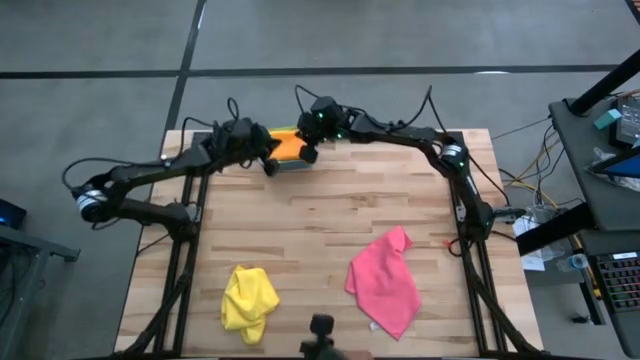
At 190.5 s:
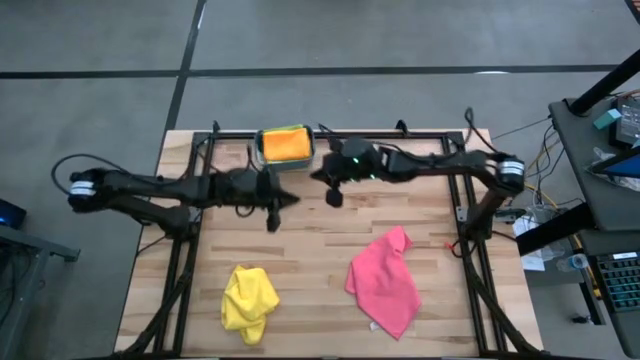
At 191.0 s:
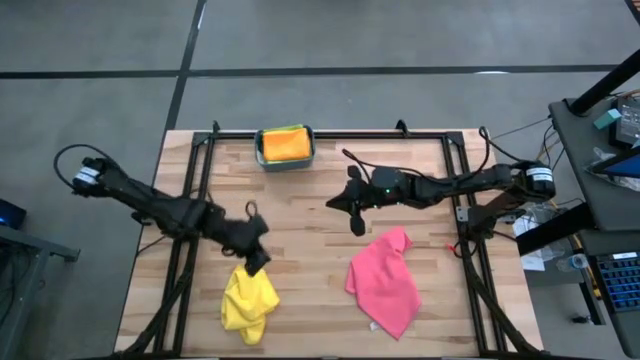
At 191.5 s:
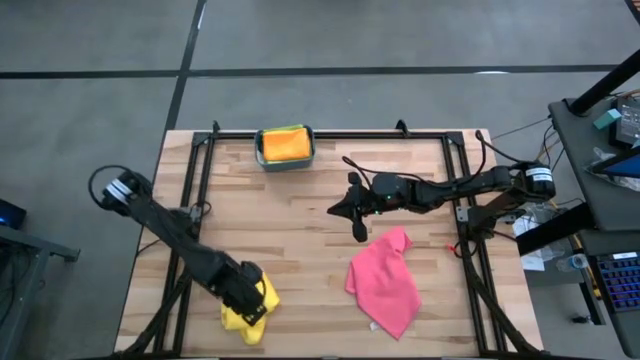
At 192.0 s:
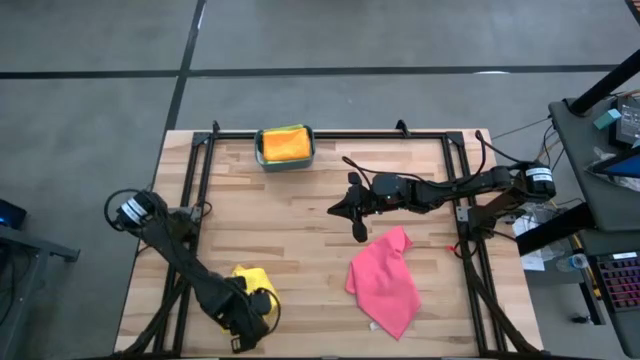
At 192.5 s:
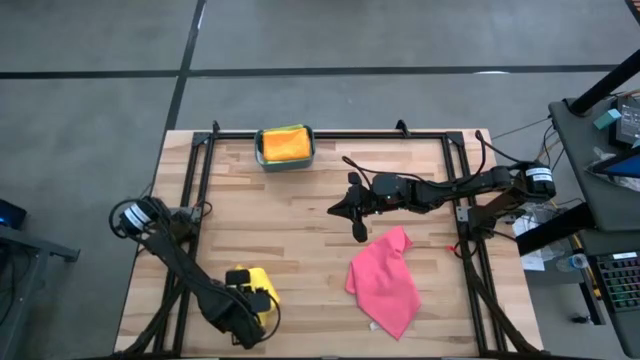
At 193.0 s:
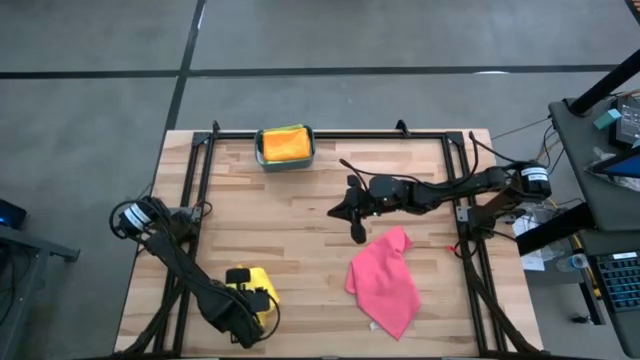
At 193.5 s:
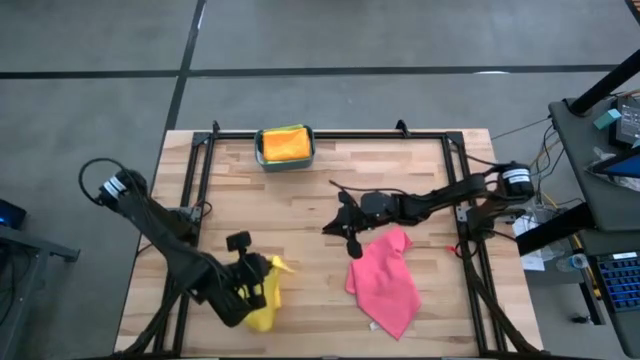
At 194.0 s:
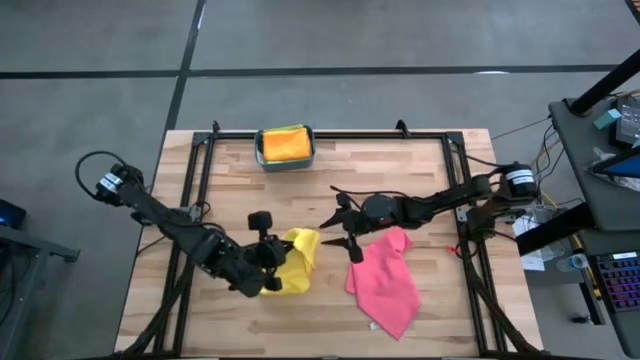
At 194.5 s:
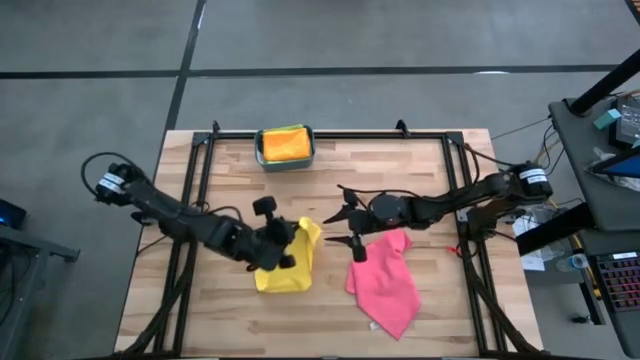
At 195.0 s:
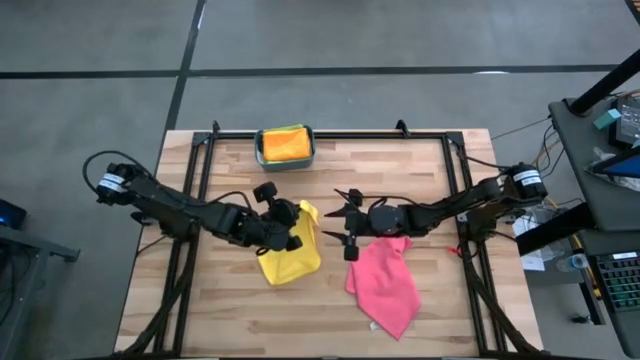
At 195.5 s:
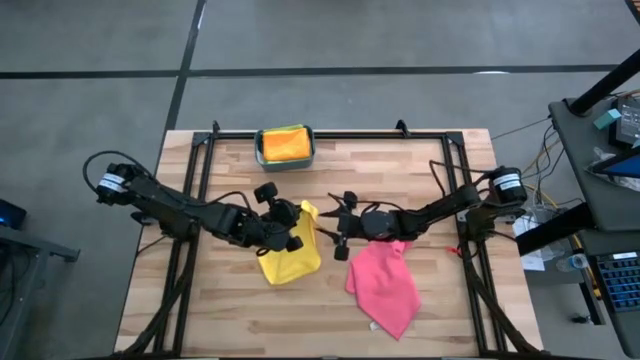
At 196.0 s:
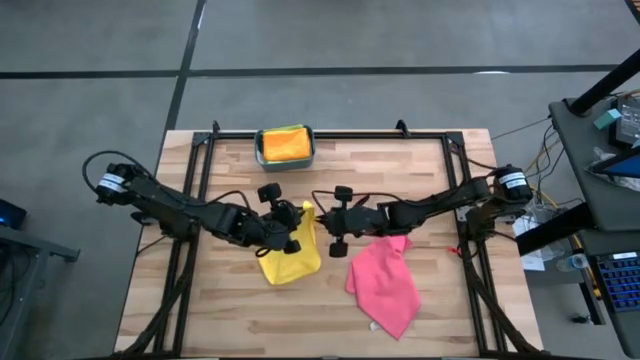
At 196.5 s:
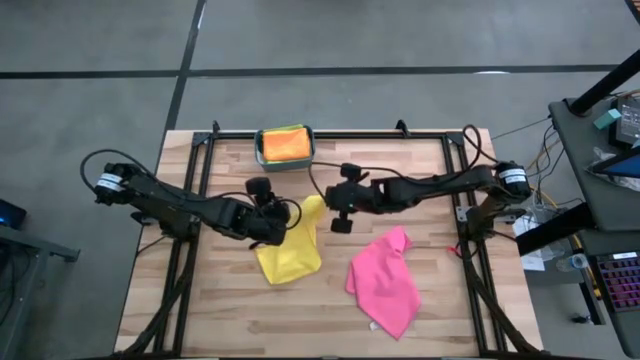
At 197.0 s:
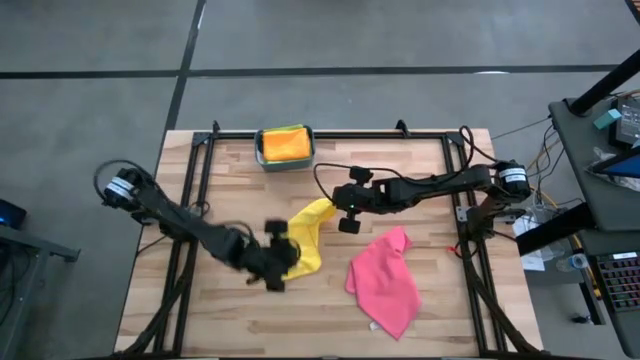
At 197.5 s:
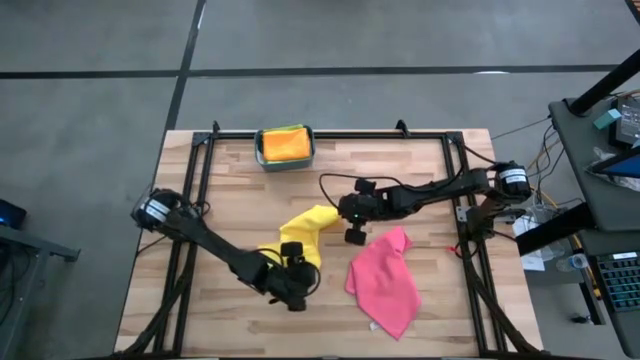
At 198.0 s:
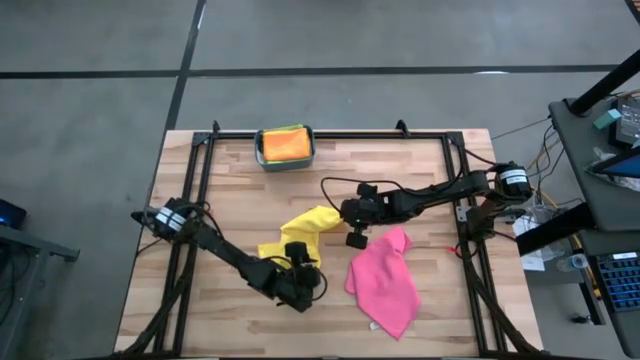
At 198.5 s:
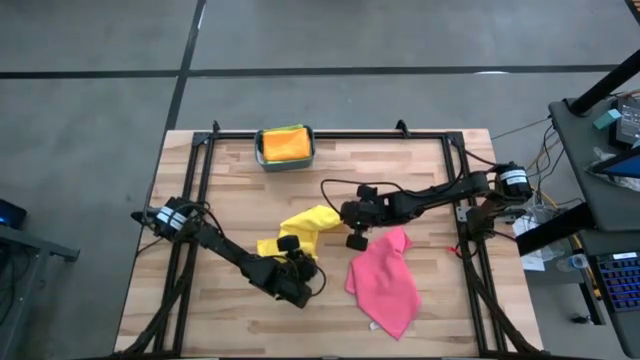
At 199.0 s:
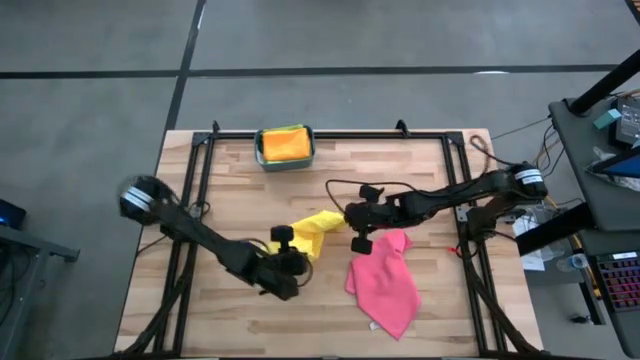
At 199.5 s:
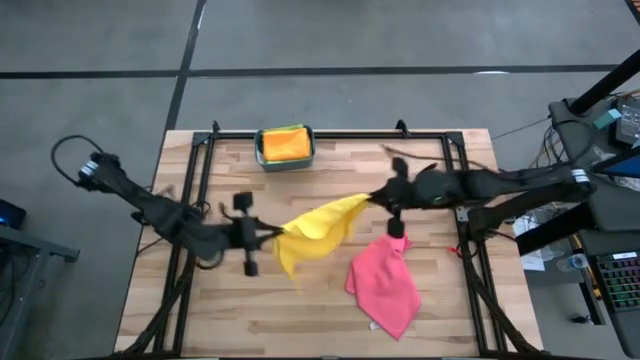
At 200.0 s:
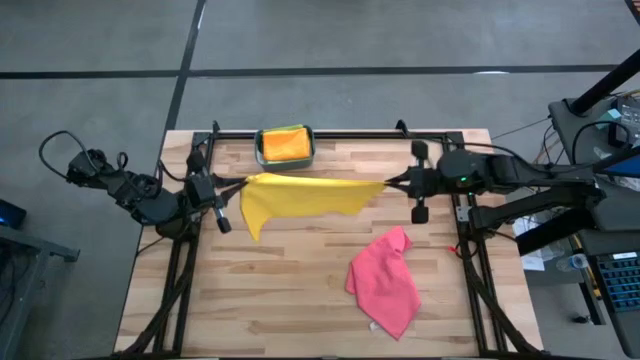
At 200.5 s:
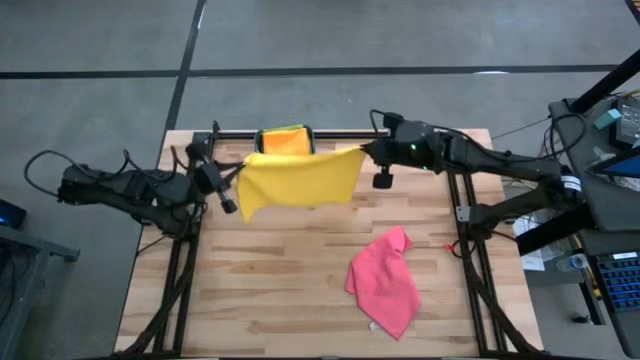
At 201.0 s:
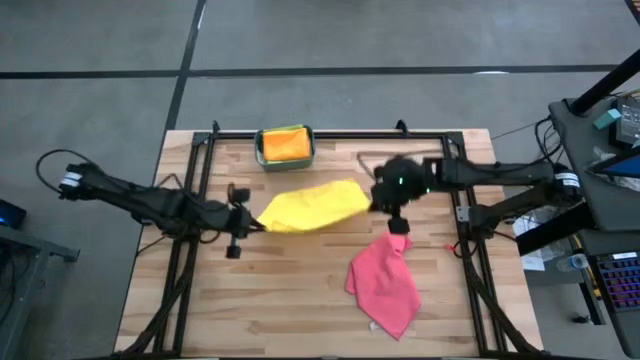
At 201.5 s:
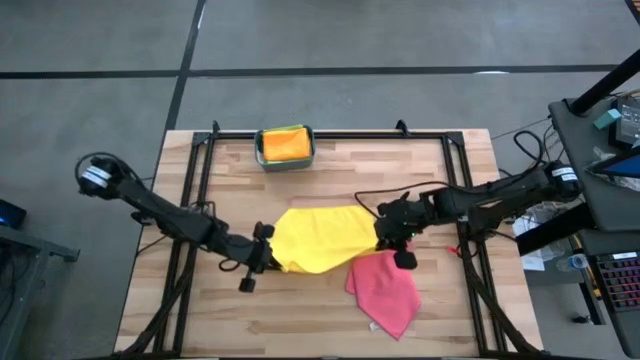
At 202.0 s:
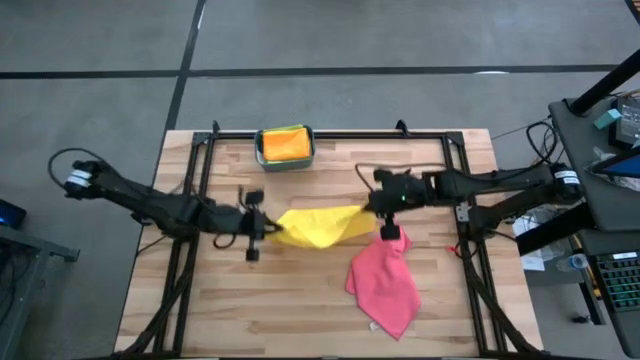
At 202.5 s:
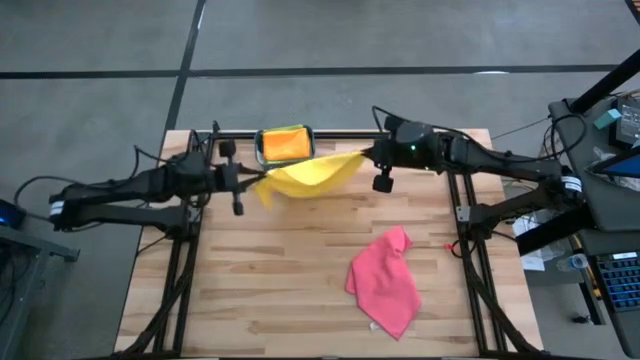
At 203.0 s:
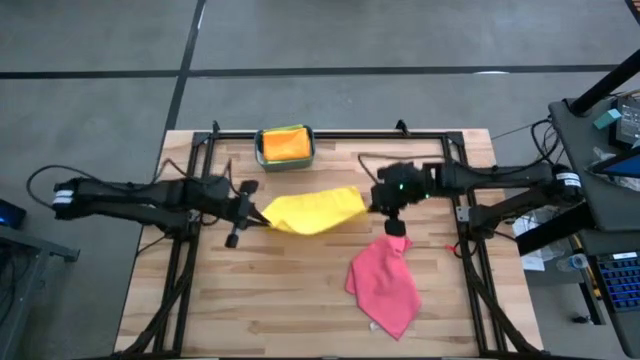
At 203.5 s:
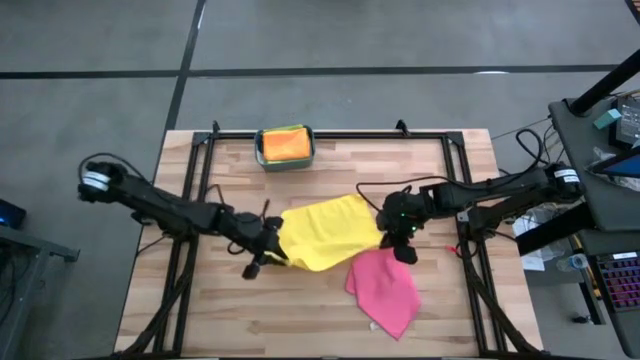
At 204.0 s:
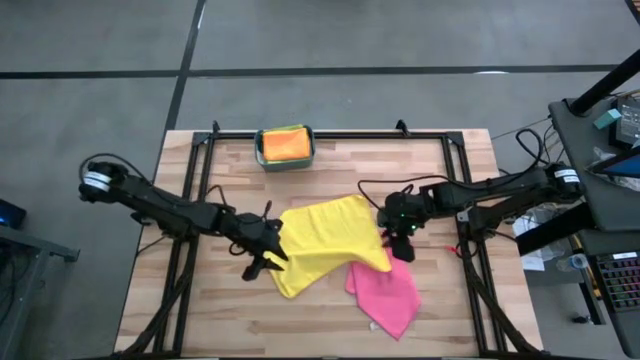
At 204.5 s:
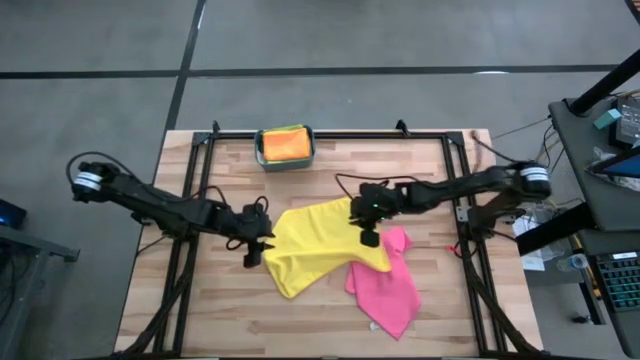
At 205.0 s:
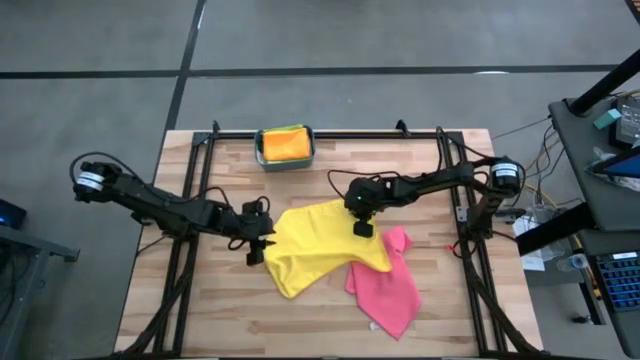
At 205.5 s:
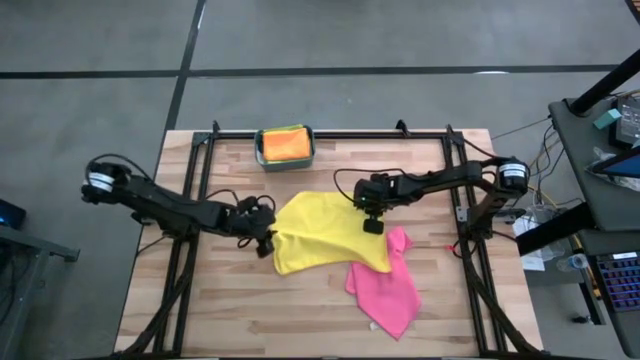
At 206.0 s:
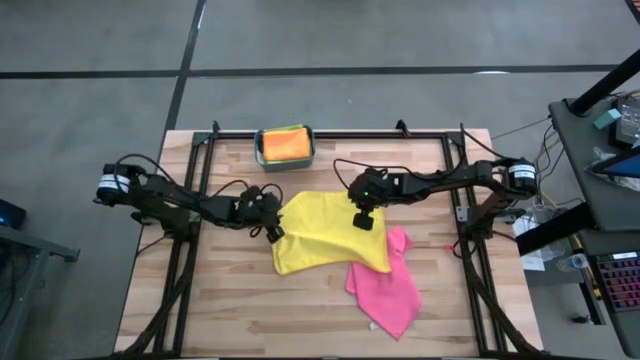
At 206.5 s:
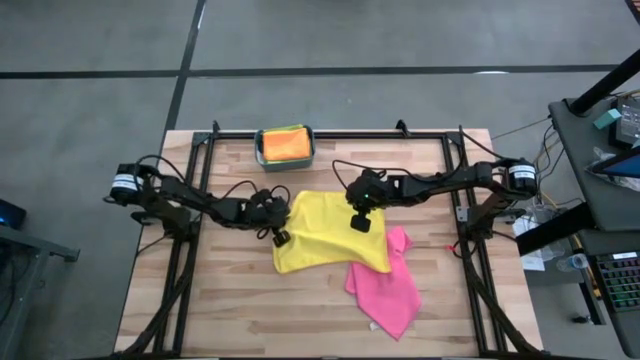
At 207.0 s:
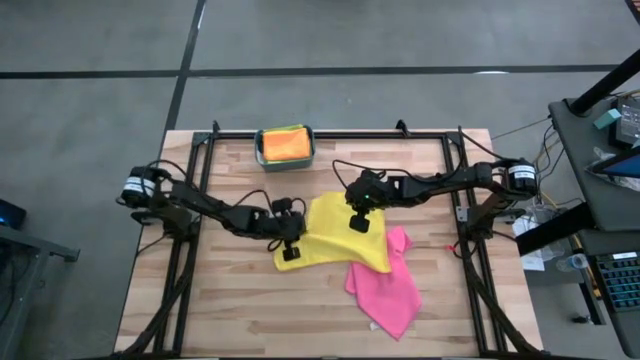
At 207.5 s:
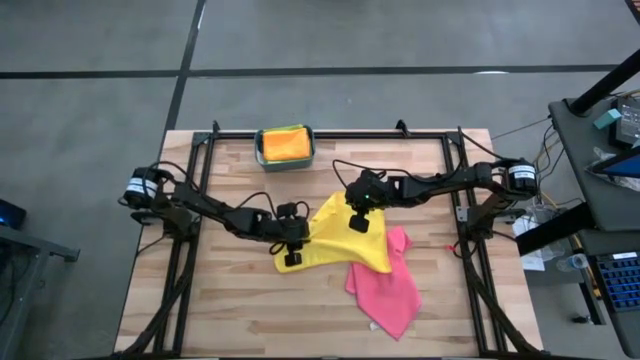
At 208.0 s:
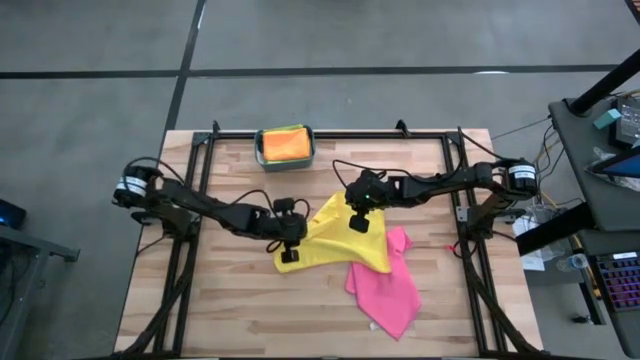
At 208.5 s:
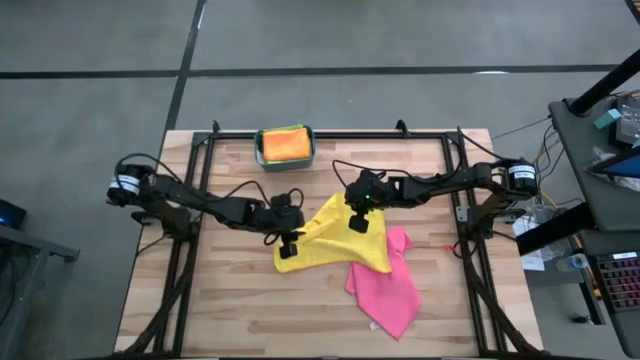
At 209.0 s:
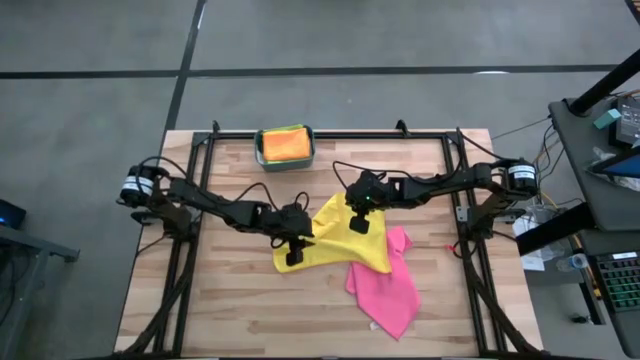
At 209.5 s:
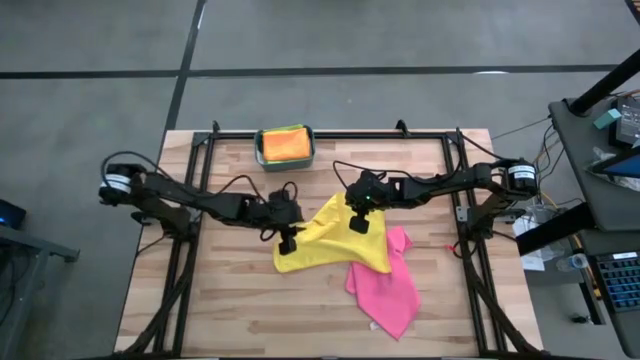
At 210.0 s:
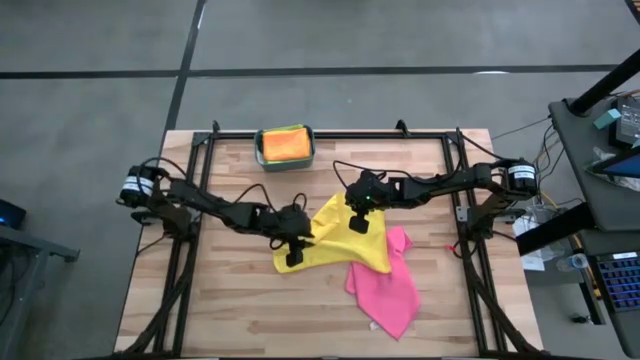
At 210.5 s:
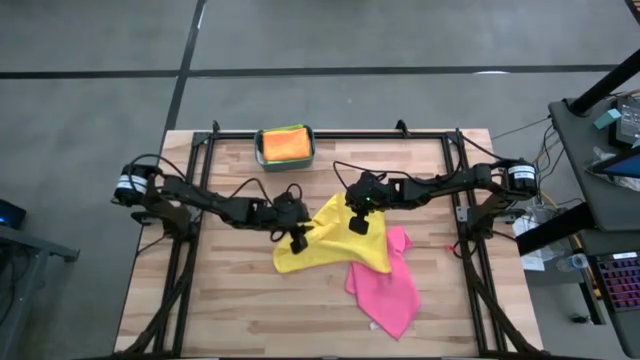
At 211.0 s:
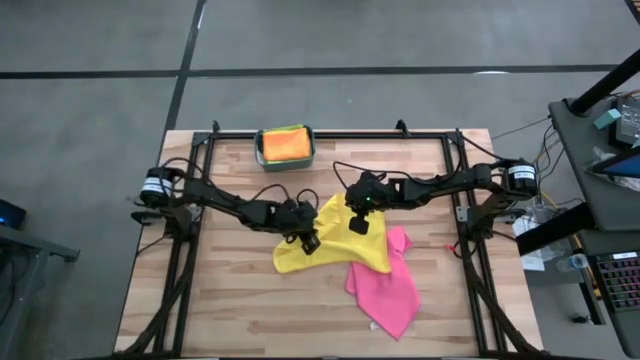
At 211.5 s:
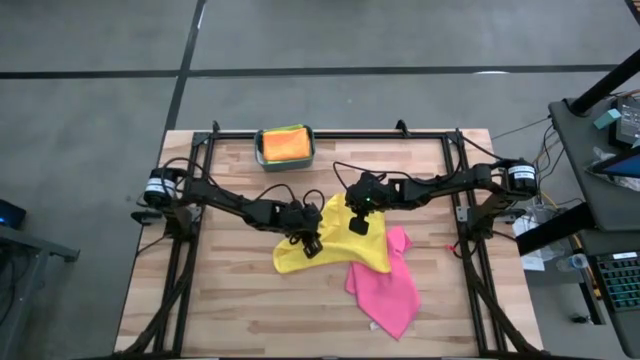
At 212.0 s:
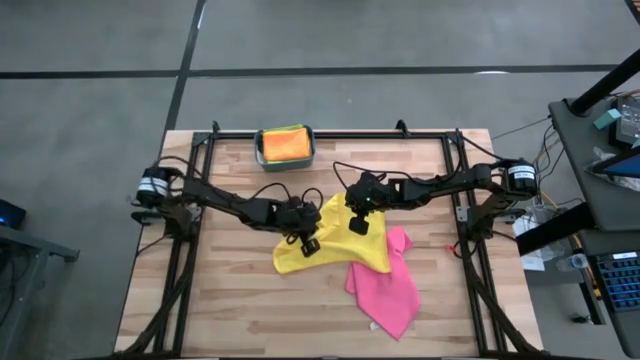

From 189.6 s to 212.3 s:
Task: Fold microfiber towels
Fold the yellow towel
